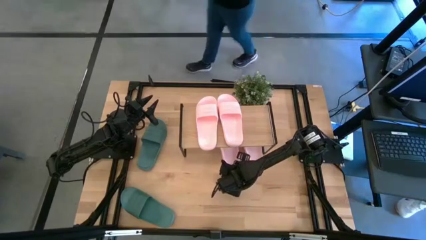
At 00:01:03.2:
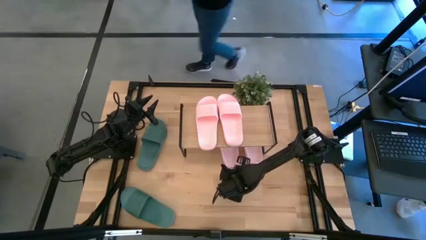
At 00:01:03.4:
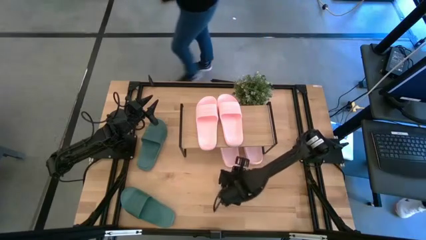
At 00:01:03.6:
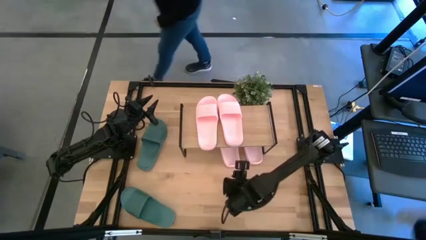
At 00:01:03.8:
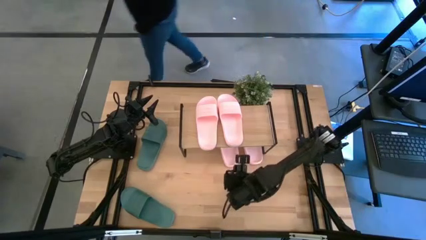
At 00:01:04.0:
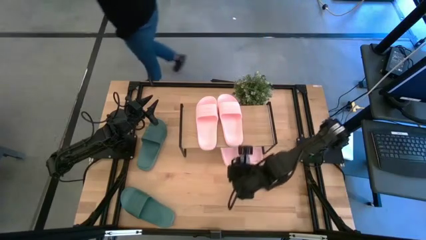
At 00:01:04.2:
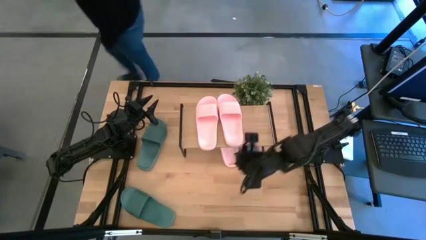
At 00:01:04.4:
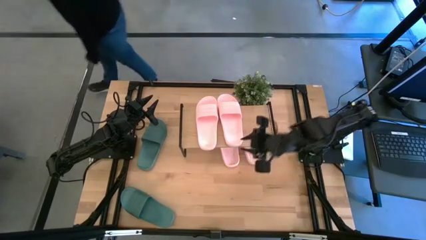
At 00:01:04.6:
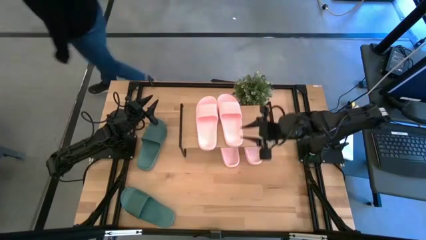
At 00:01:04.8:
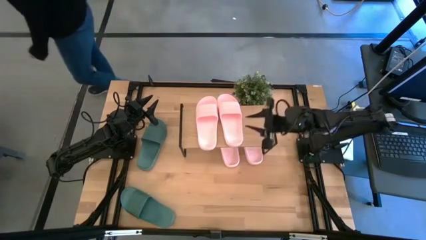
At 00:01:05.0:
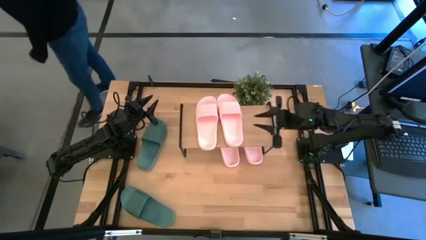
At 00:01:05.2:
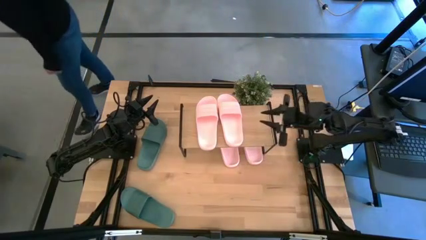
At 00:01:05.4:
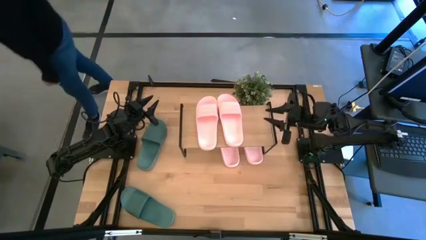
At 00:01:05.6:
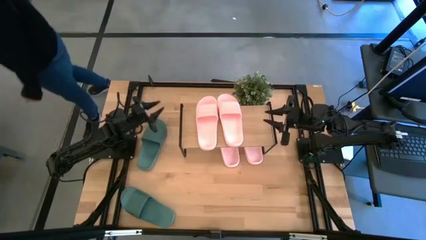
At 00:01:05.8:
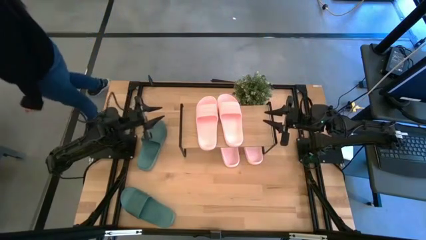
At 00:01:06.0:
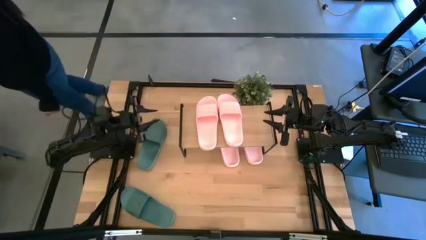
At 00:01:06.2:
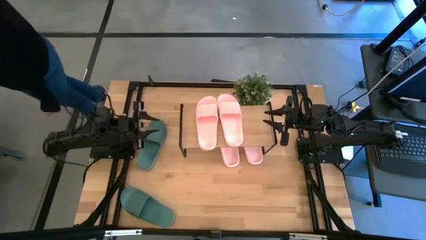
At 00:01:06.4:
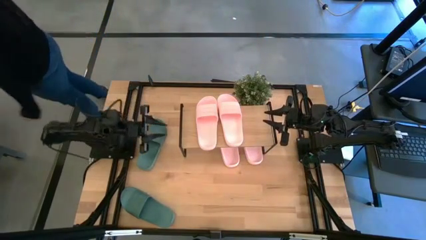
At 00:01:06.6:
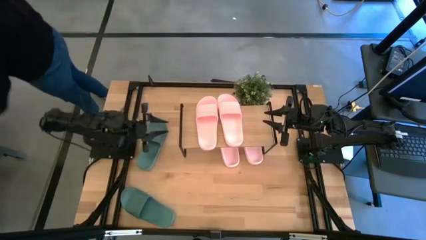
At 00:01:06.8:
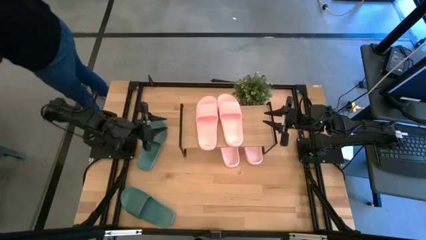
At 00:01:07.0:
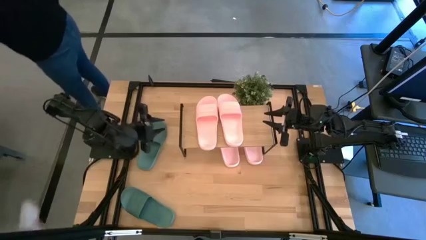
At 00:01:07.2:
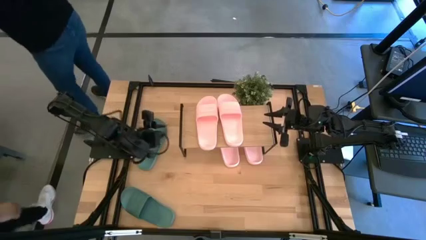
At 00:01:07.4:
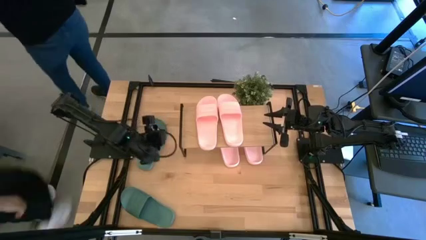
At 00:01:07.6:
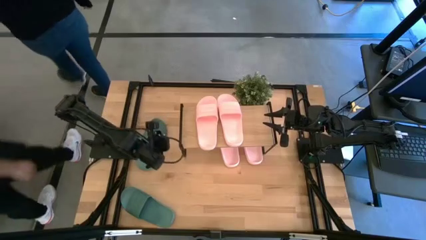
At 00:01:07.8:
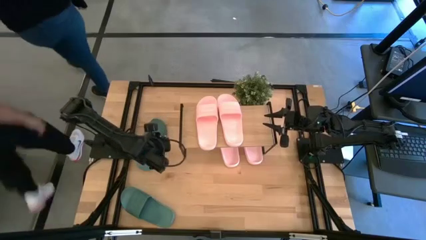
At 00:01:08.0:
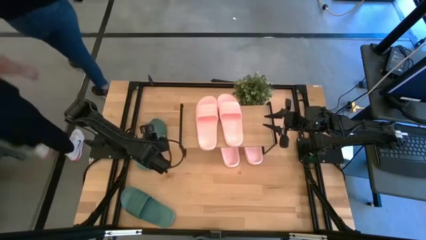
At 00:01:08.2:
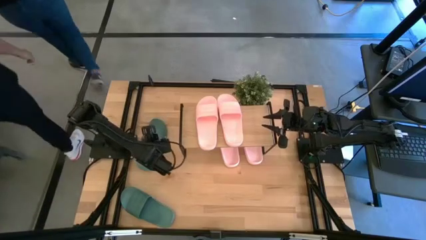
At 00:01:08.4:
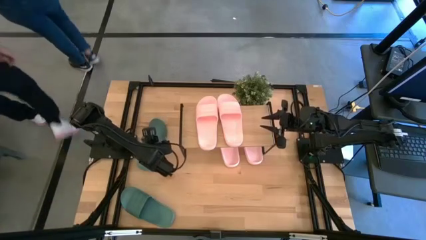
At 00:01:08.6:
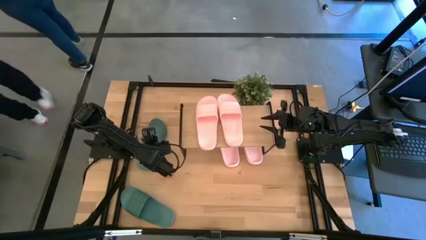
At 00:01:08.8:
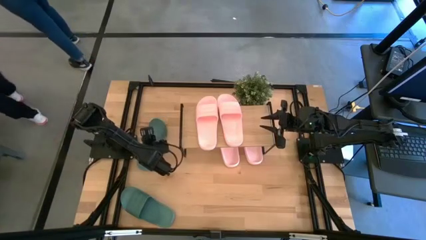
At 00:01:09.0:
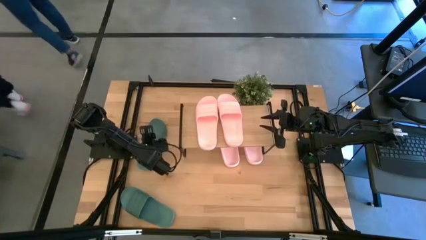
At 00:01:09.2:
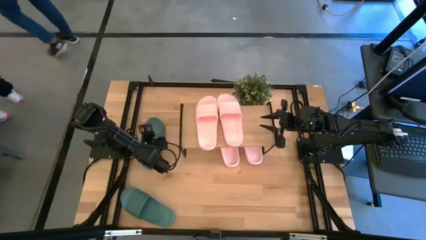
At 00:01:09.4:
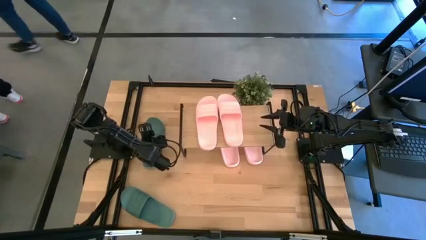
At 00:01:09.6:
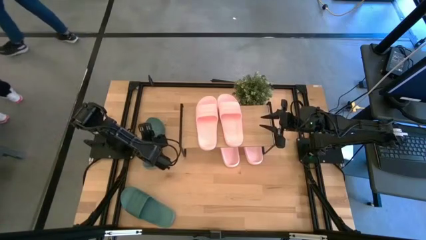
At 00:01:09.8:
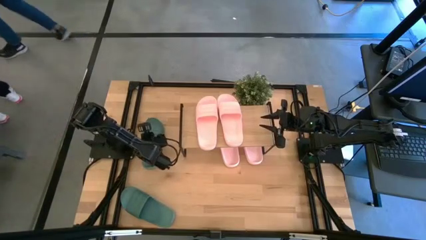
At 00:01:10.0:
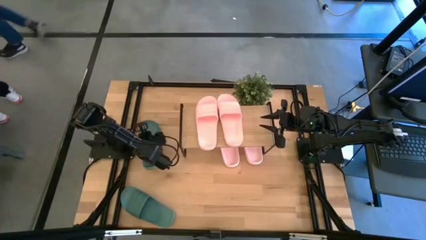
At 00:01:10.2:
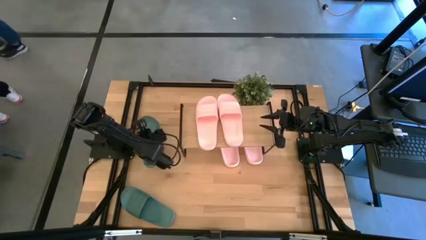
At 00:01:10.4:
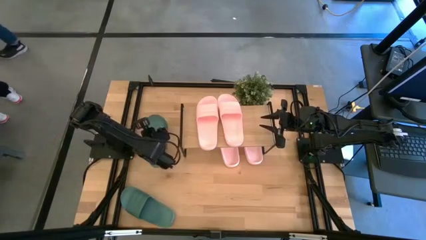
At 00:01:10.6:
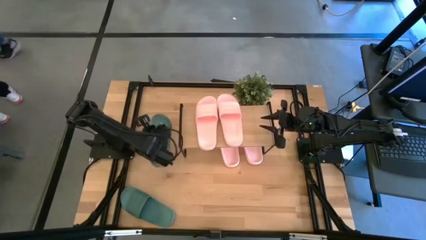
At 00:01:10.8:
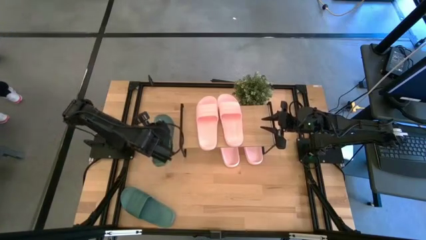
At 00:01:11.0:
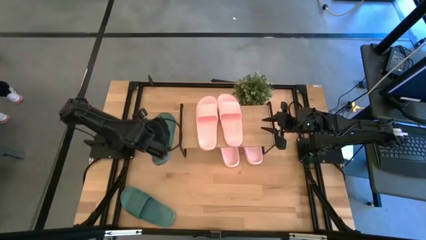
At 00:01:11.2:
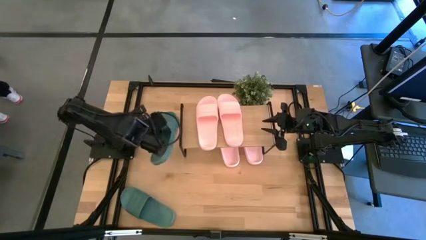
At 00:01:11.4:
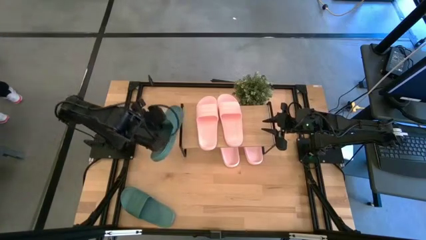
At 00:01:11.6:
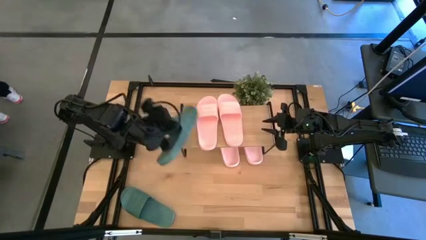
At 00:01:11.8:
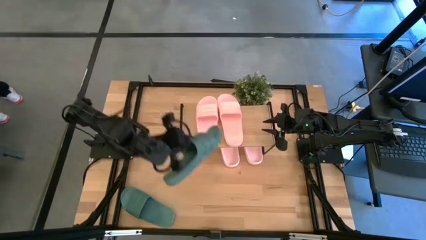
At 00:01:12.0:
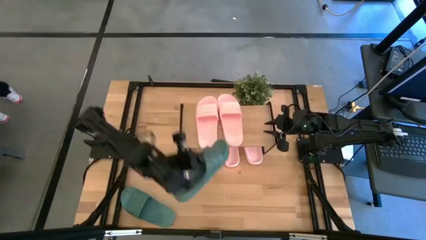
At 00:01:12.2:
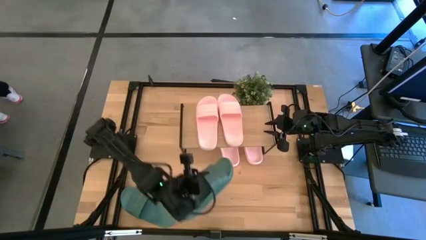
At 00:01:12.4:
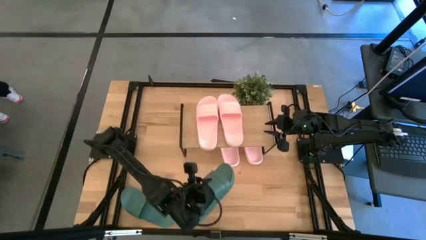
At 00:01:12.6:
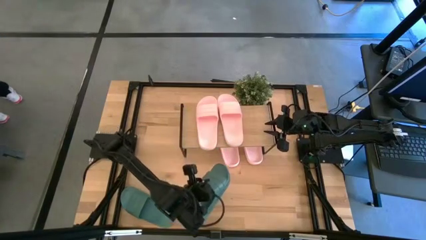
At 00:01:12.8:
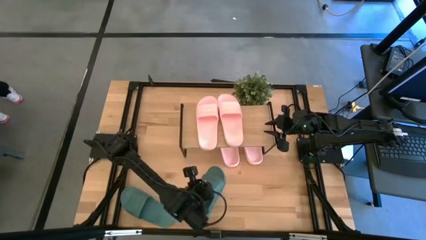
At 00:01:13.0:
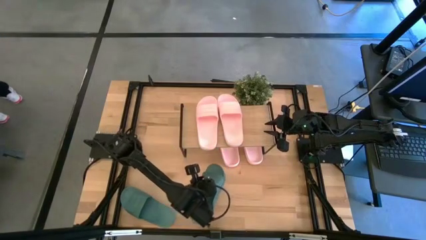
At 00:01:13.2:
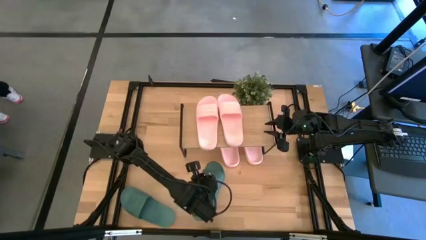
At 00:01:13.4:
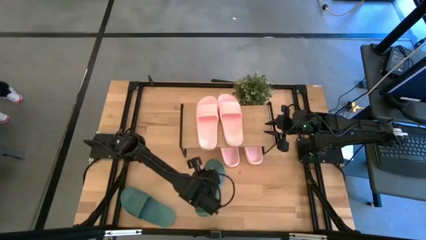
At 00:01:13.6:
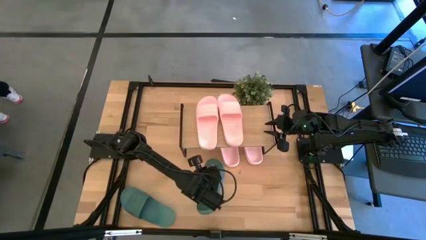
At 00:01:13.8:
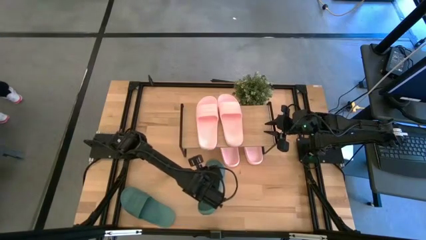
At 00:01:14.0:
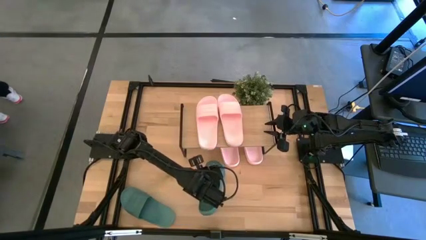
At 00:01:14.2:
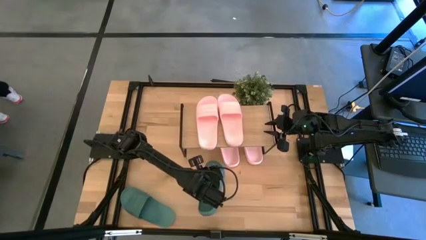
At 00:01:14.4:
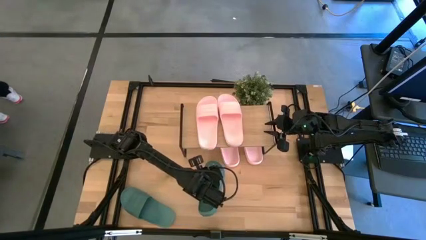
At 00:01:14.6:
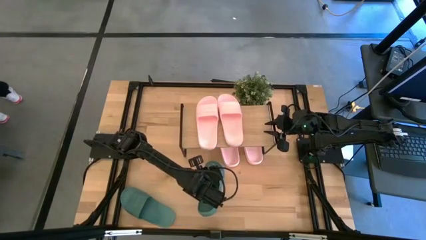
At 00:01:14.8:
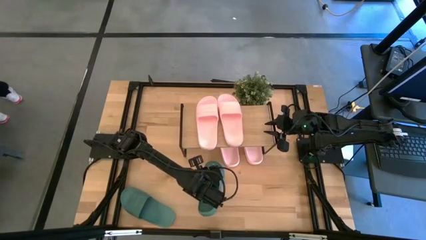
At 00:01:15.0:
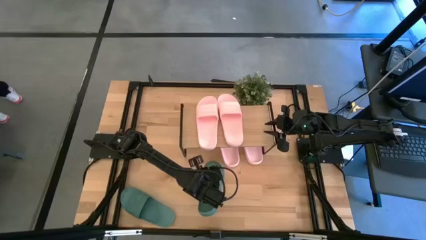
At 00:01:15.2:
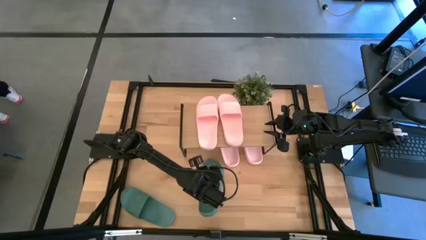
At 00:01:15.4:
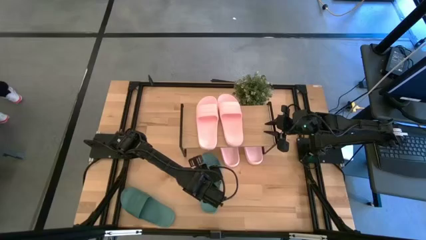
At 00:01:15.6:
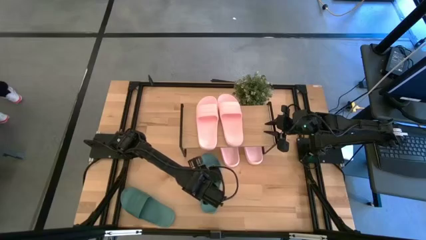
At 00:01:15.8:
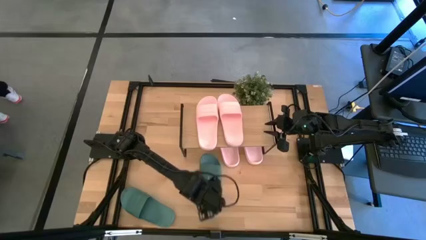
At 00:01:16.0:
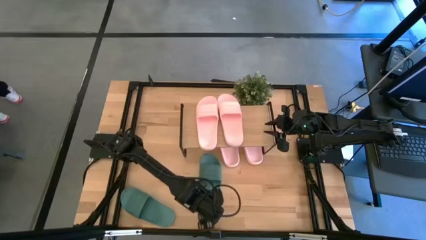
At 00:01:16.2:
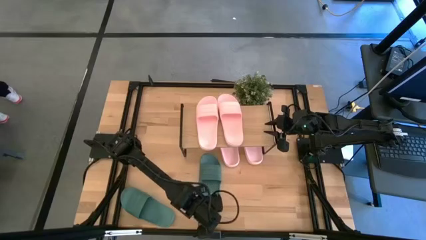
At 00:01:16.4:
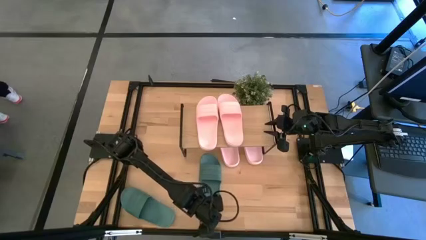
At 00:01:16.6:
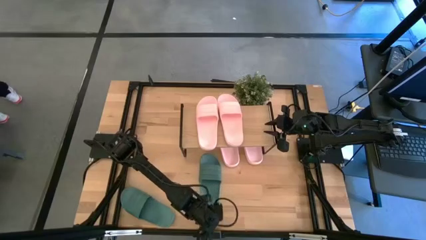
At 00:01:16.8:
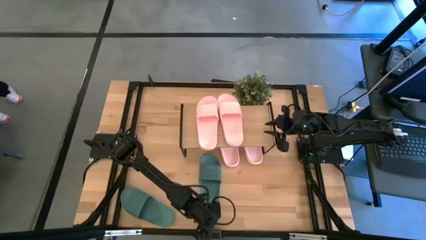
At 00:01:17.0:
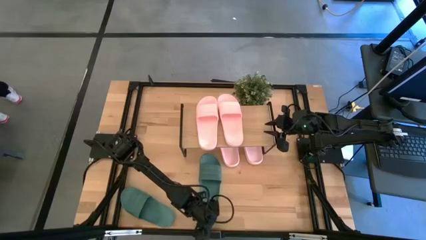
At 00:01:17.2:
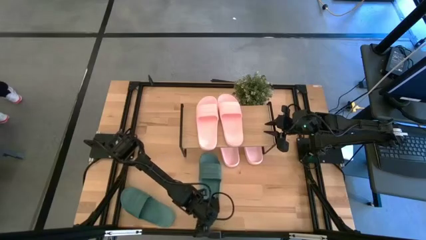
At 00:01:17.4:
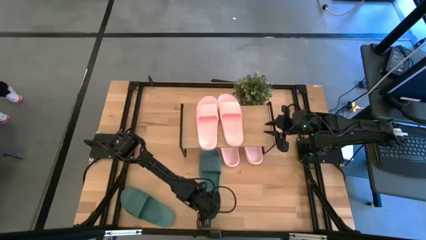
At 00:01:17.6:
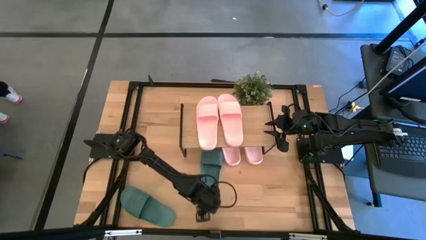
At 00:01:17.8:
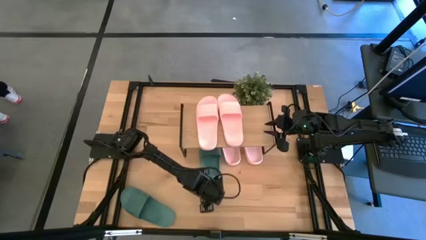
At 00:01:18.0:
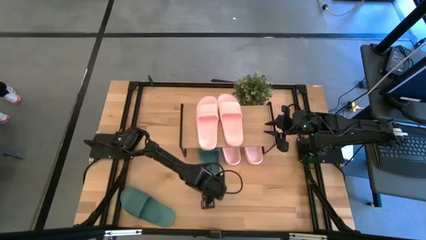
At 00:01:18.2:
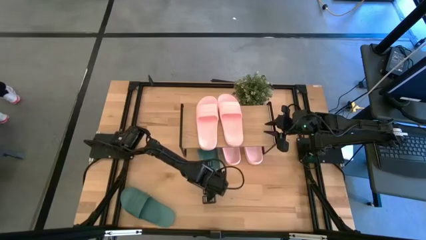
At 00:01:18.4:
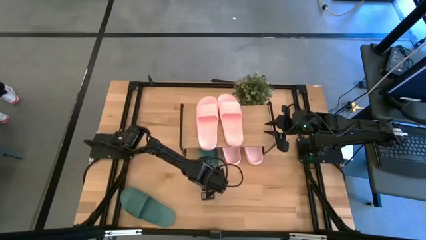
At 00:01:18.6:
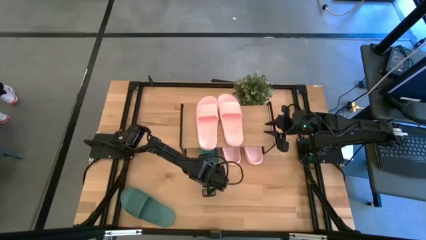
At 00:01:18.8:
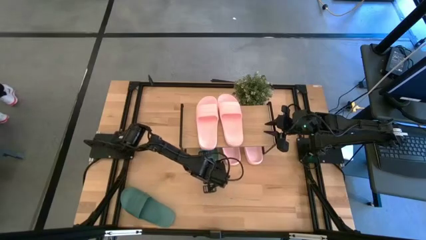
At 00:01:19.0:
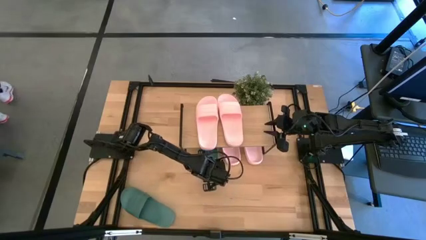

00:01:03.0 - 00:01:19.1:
Task: Pick and place slides into the shelf
Put the green slide under the shelf

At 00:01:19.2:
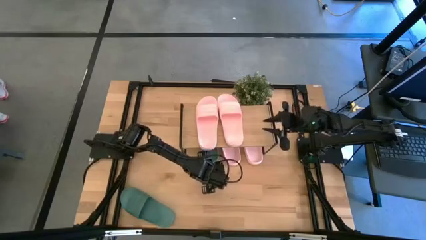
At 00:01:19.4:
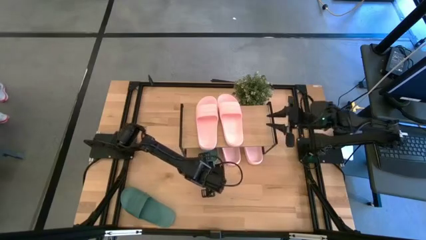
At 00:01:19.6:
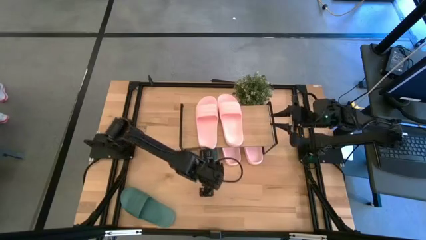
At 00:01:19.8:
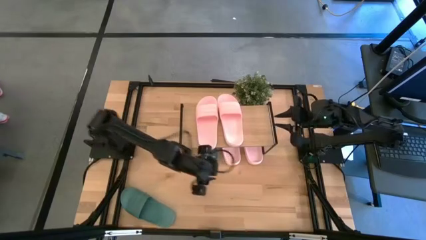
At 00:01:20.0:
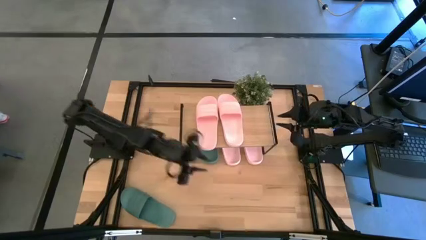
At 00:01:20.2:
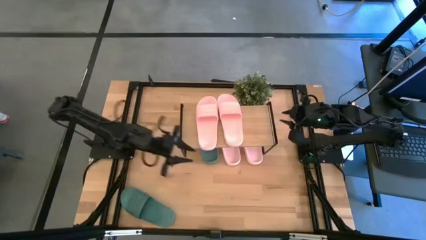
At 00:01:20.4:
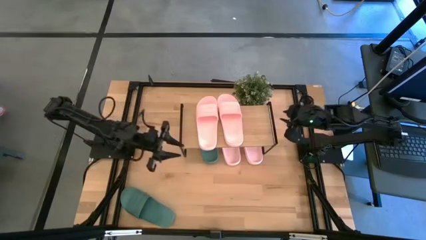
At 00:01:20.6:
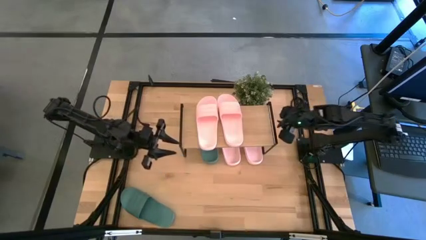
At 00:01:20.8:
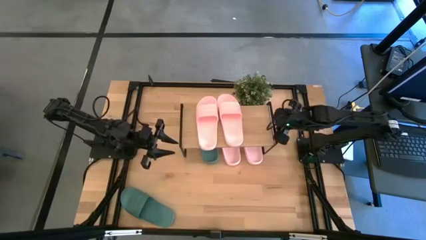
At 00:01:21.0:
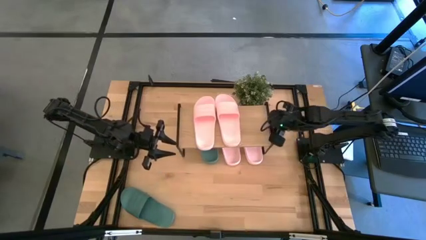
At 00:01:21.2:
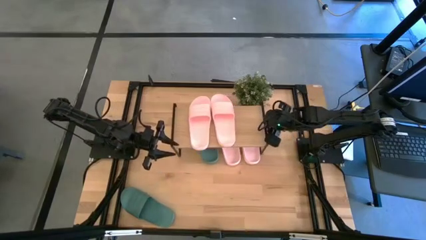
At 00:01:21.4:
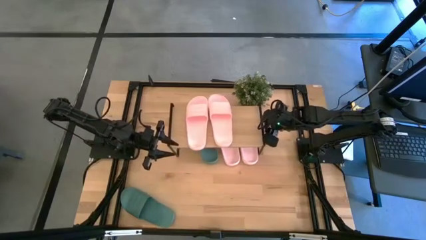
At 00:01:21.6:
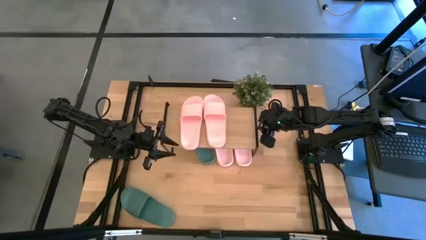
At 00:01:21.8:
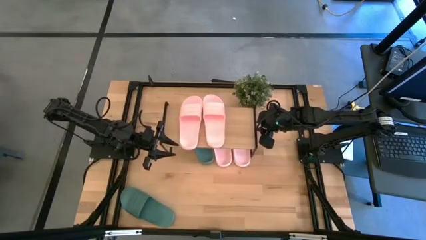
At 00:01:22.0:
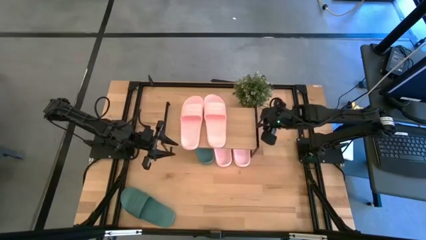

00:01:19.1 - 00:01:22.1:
Adjust the shelf
